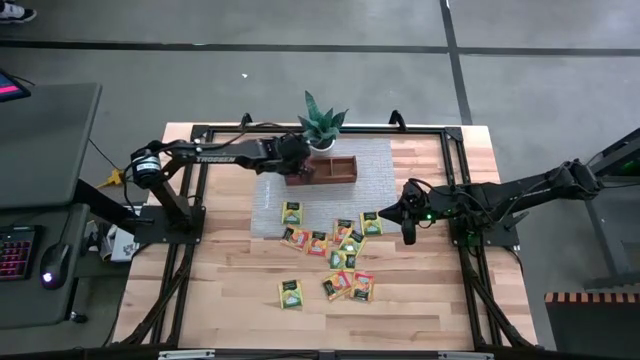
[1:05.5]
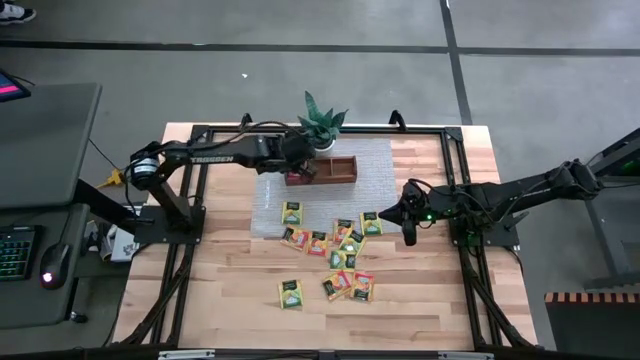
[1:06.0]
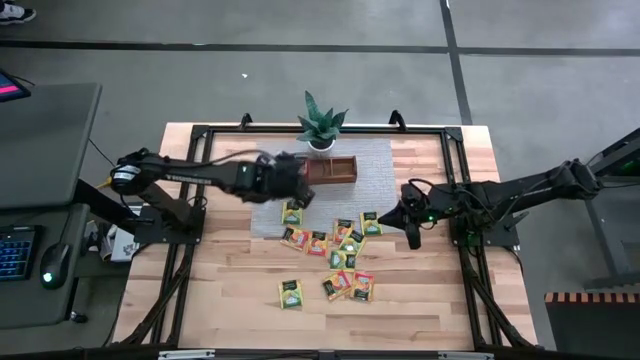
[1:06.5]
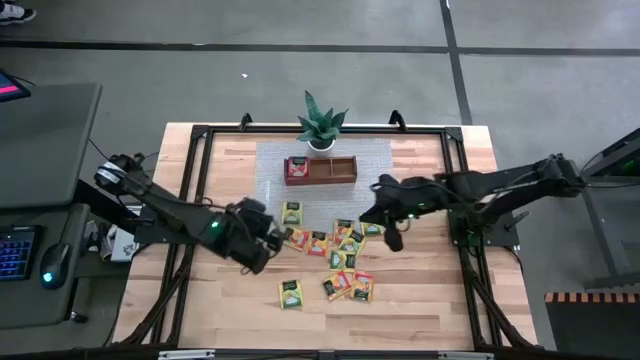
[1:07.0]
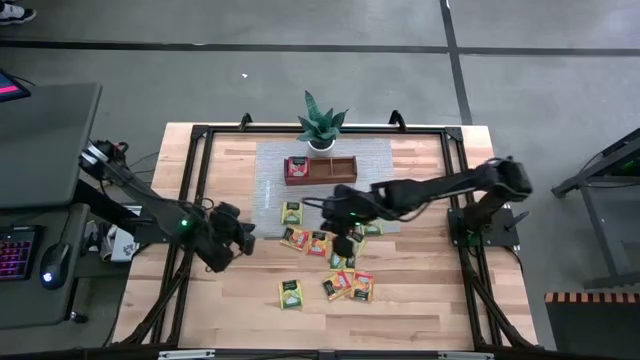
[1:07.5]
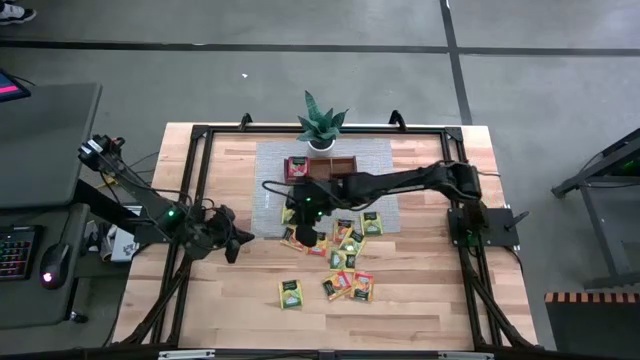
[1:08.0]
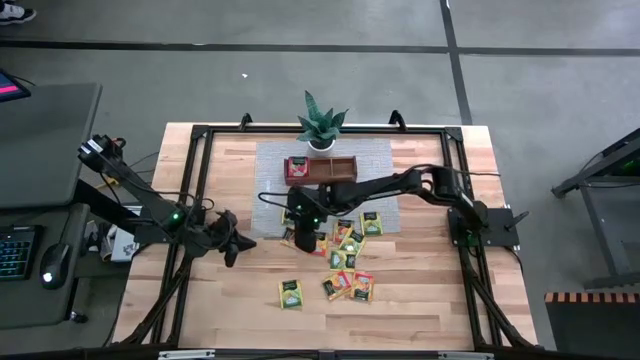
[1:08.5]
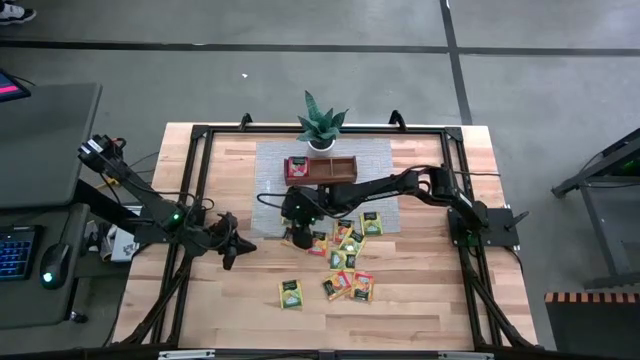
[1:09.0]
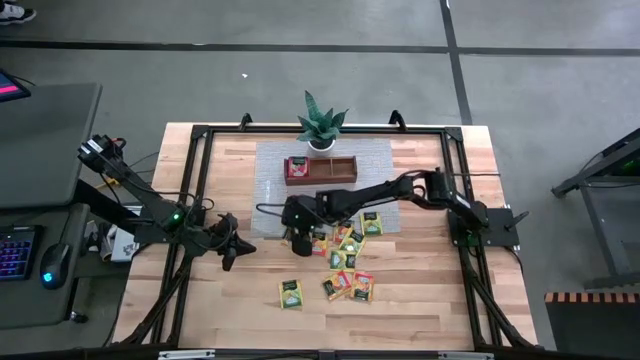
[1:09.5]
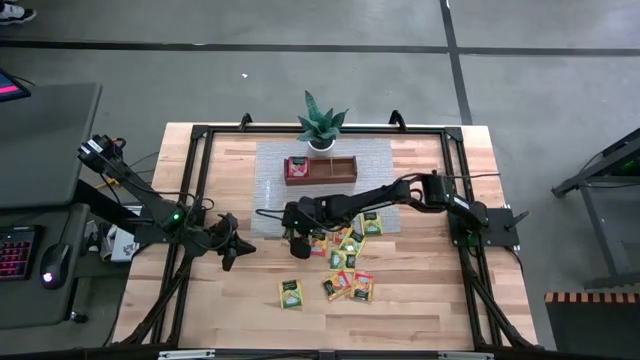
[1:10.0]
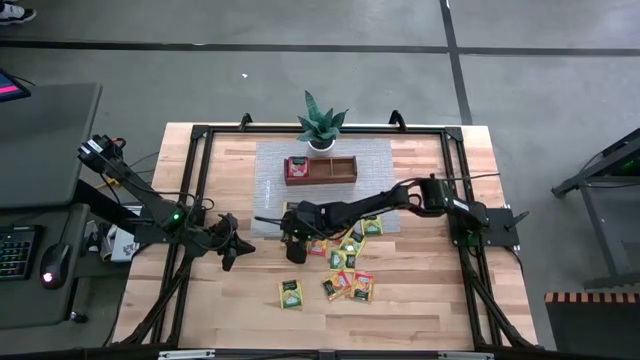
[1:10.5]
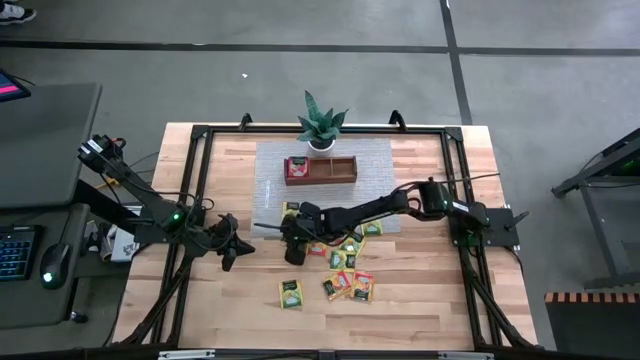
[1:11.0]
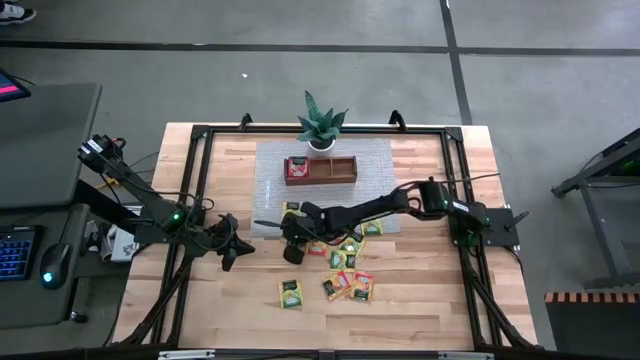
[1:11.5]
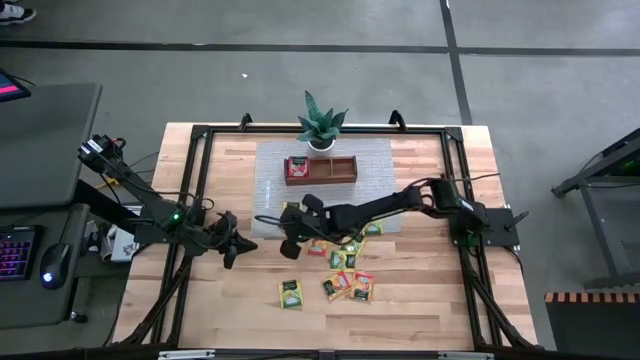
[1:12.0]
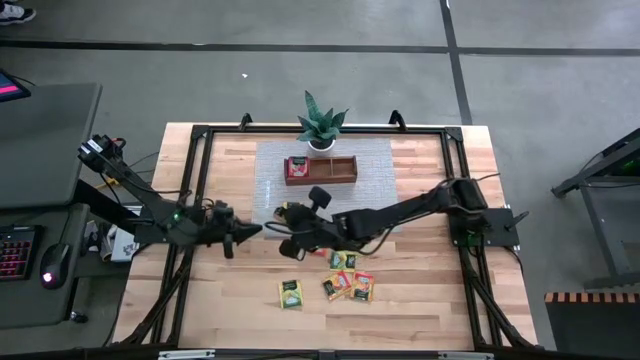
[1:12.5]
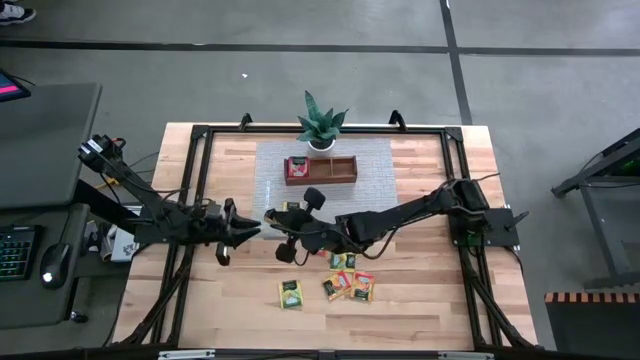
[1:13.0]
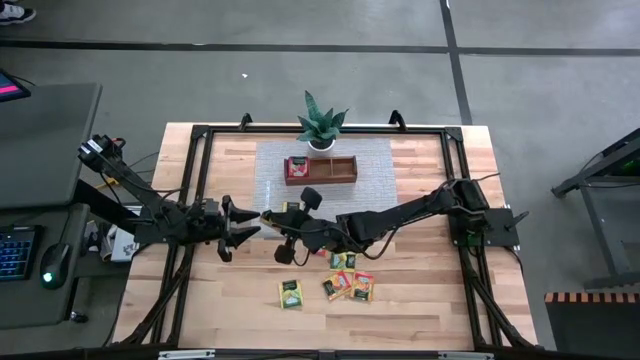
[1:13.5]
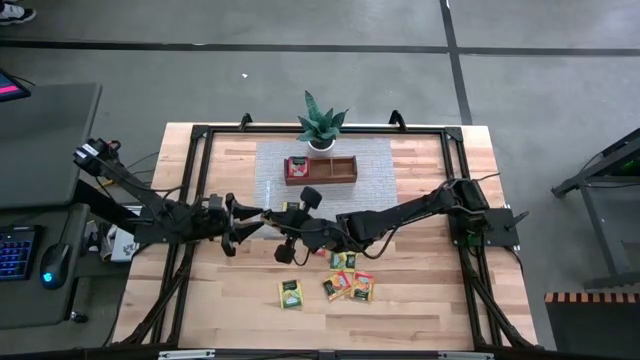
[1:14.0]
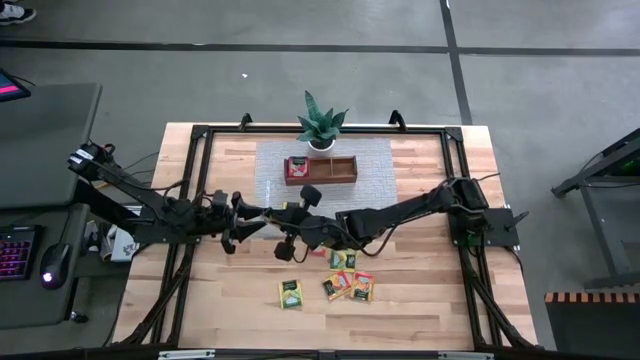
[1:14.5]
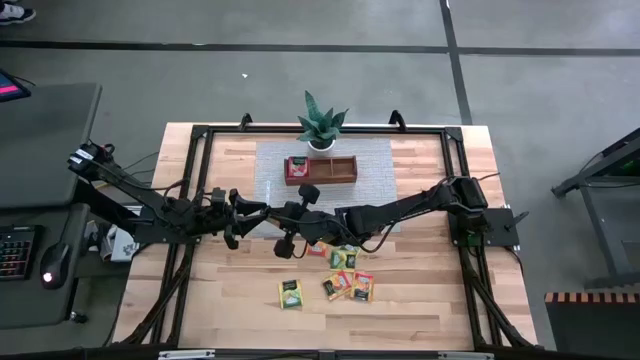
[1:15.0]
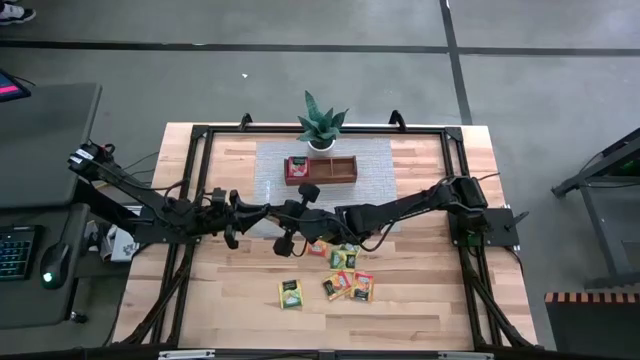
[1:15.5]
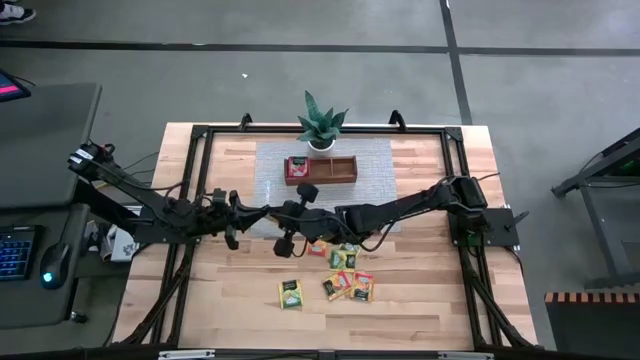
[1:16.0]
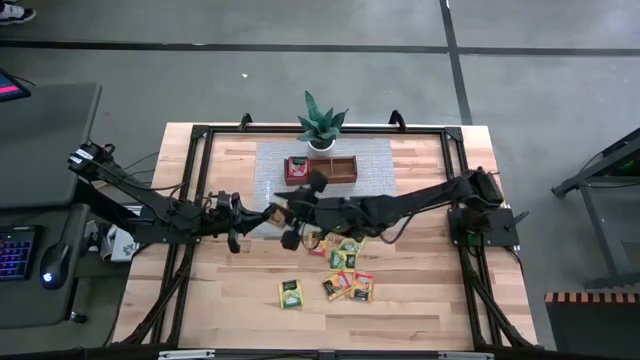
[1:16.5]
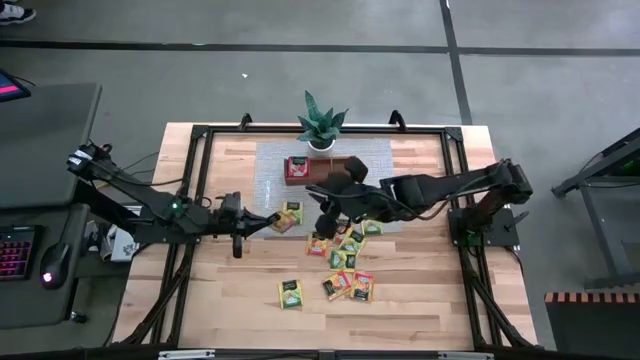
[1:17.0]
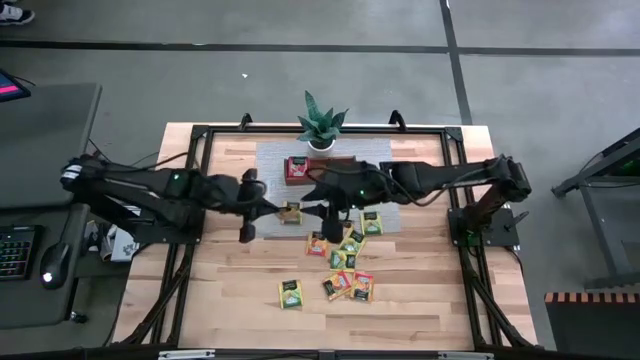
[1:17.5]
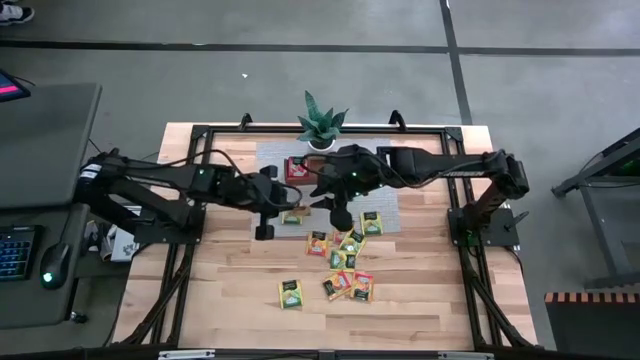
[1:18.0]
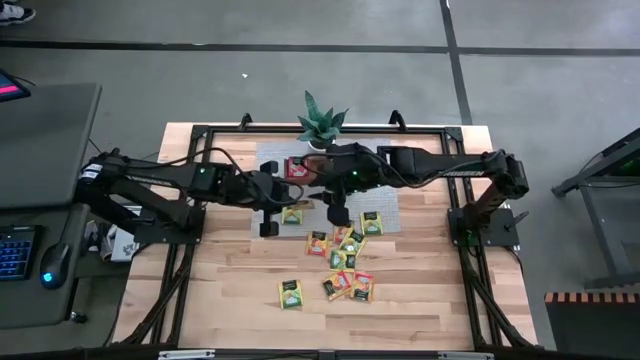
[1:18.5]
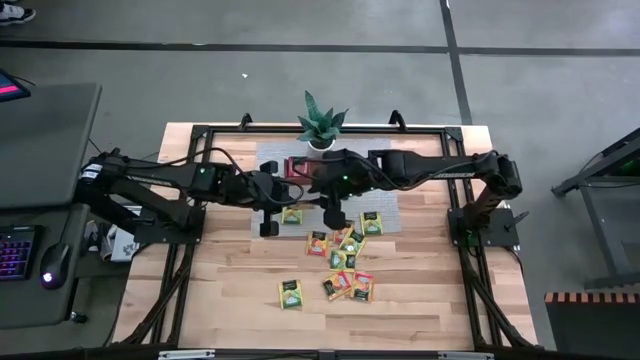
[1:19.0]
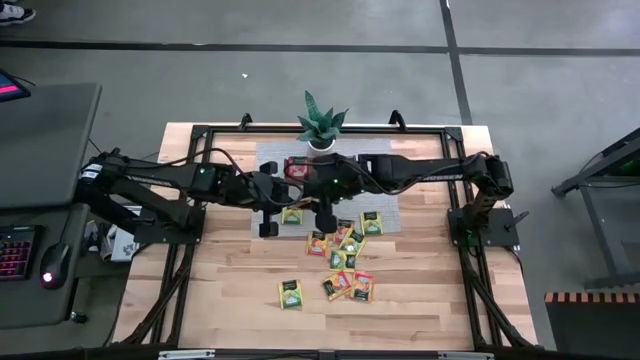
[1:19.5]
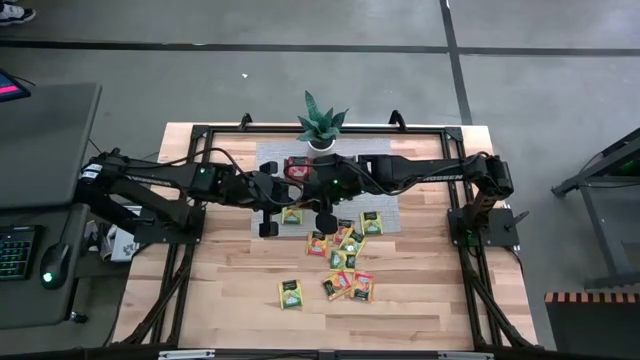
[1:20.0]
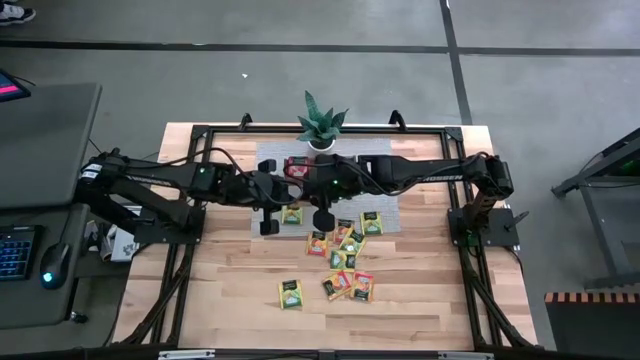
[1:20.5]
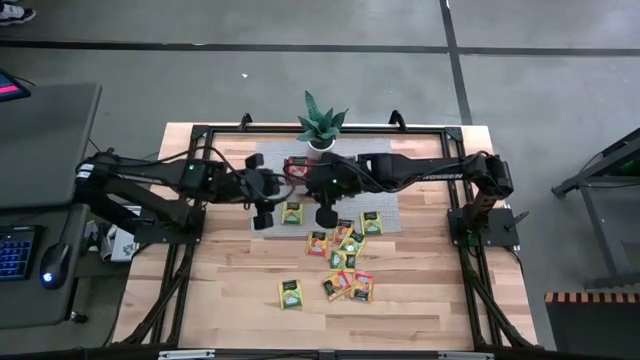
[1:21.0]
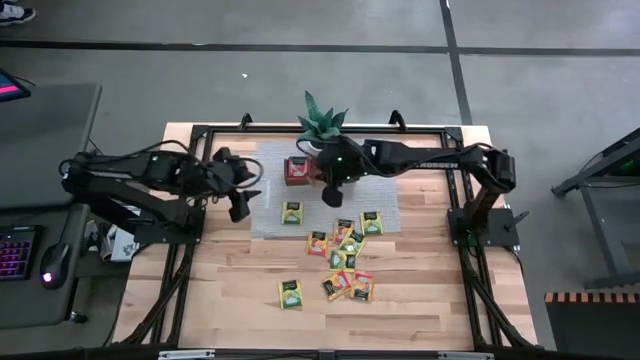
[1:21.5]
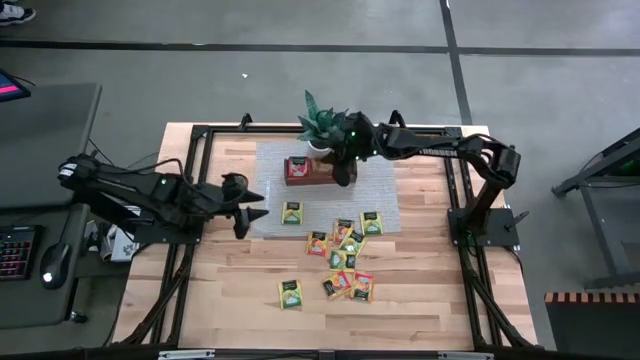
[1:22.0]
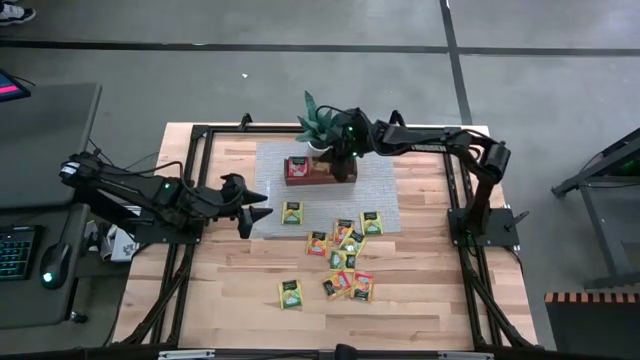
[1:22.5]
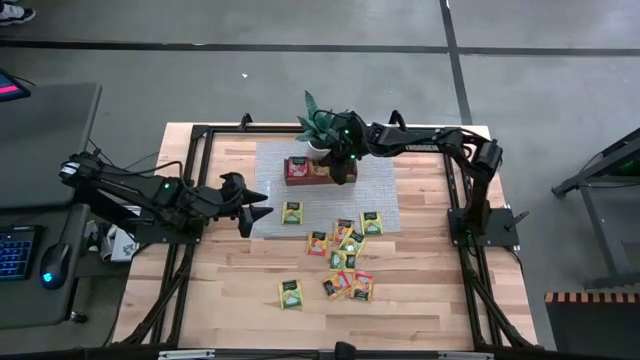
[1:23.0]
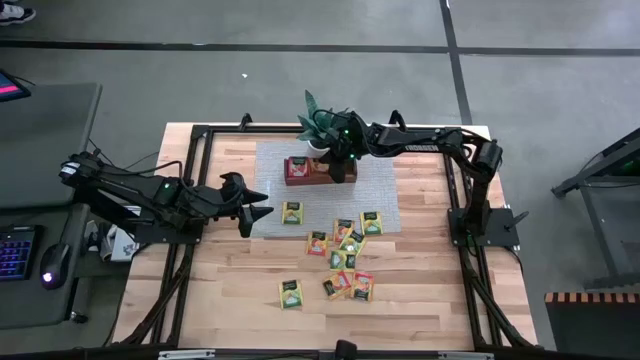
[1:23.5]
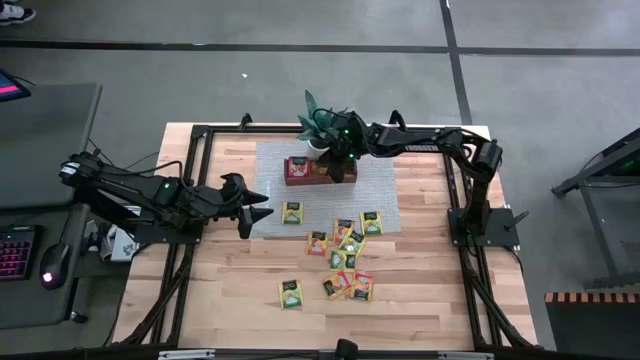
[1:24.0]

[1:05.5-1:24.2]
Task: Pick & Place Tea
Put the orange tea bag into the middle section of the wooden organizer

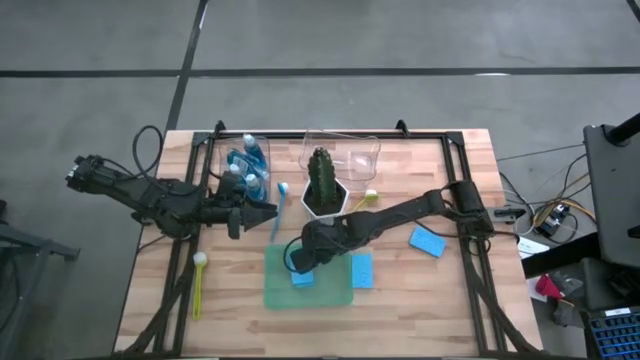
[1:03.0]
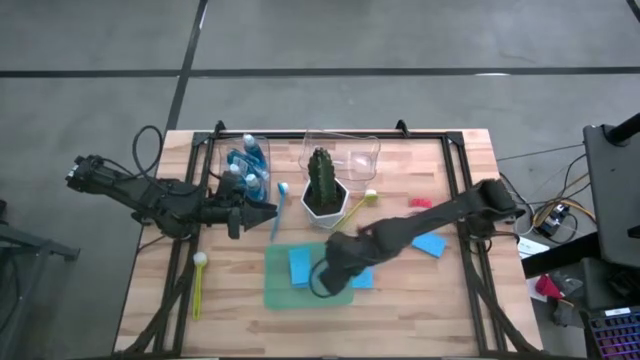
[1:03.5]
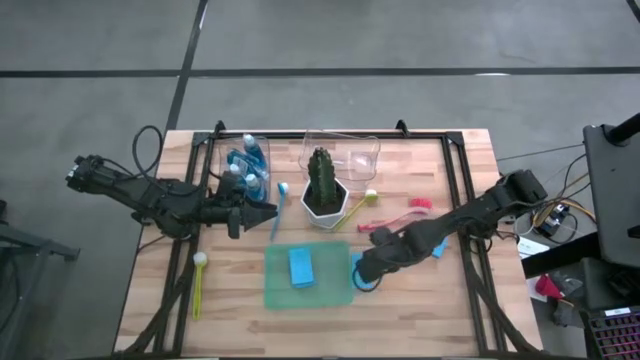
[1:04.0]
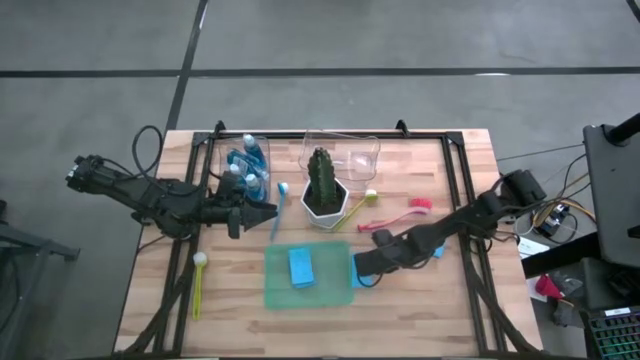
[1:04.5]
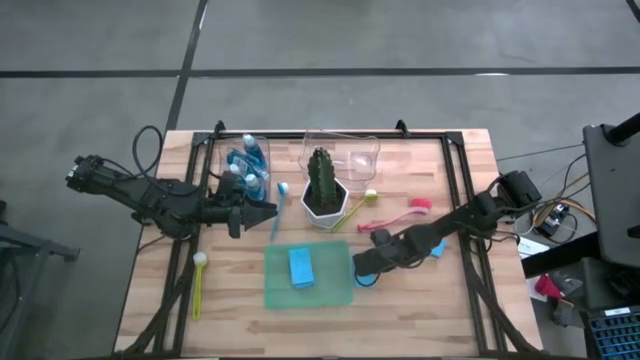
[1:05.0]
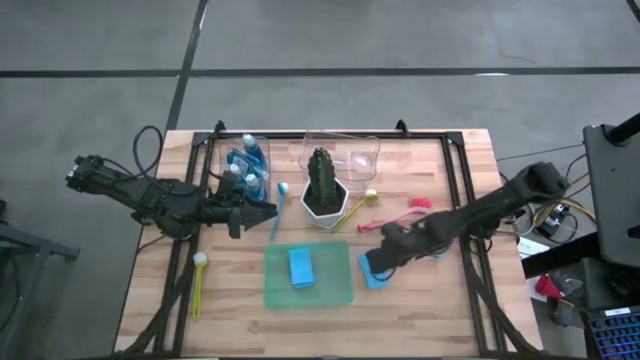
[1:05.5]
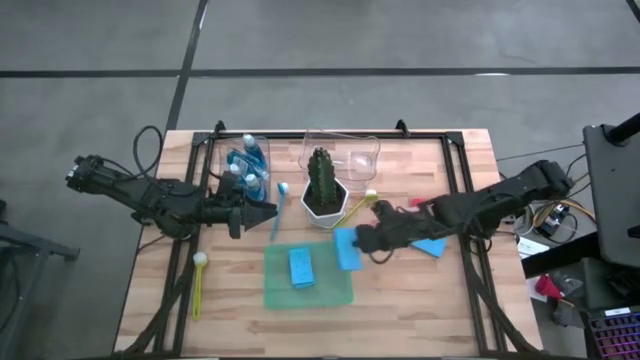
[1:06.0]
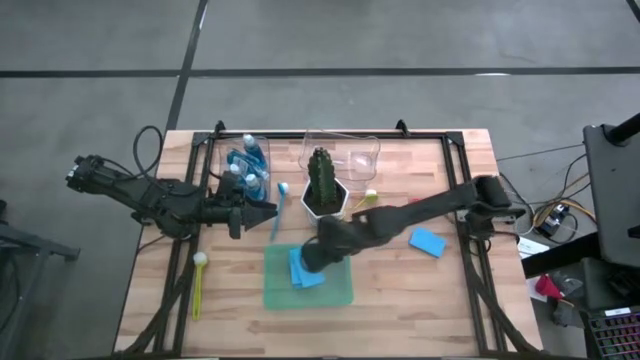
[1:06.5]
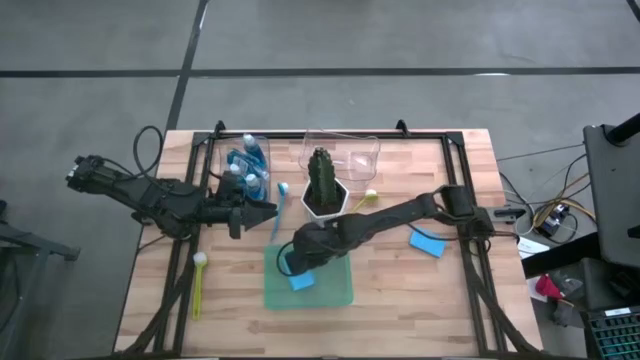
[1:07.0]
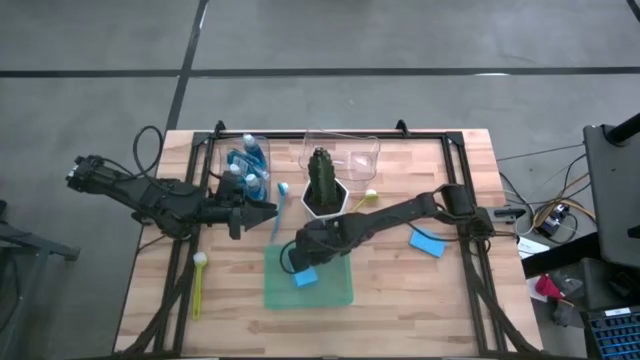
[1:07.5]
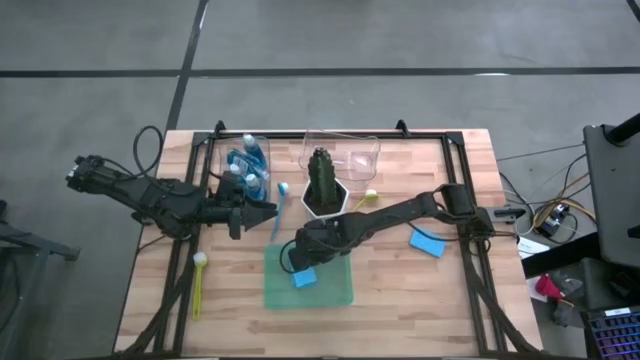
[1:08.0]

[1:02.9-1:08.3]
Task: Pick & Place Kitchen Sink Supplies
Put the blue sponge wipe into the green bin
